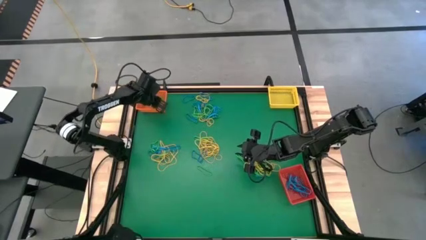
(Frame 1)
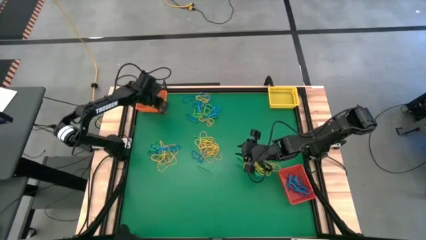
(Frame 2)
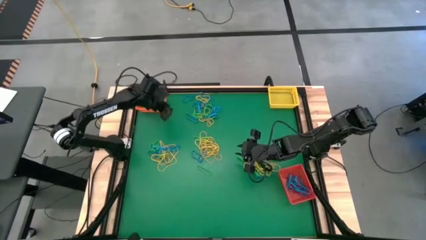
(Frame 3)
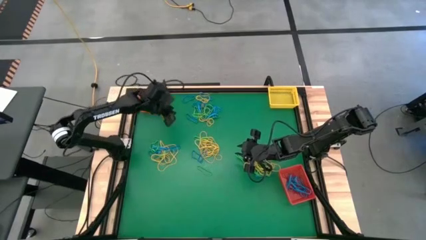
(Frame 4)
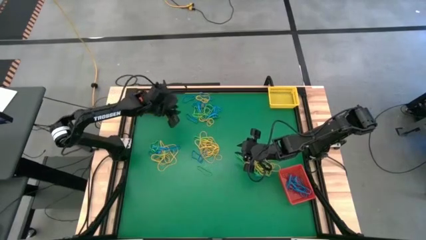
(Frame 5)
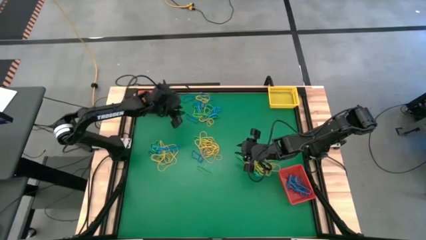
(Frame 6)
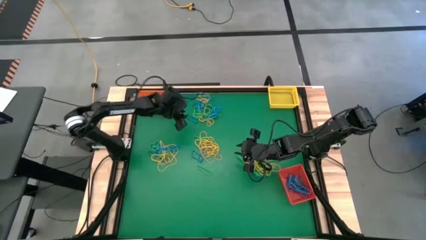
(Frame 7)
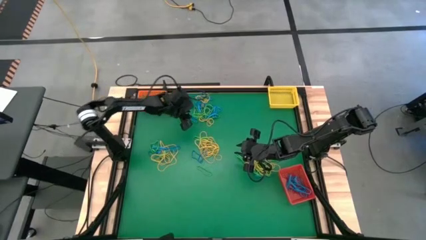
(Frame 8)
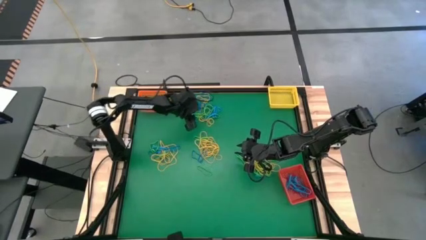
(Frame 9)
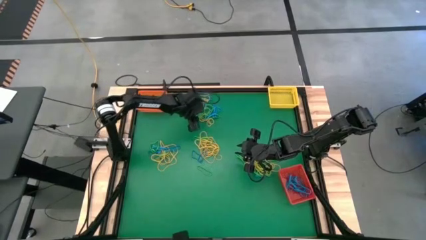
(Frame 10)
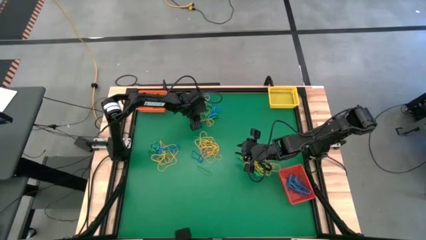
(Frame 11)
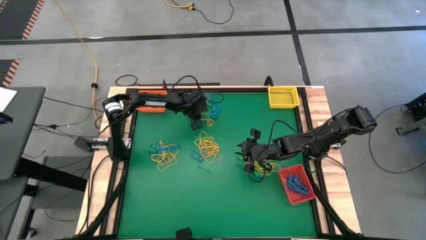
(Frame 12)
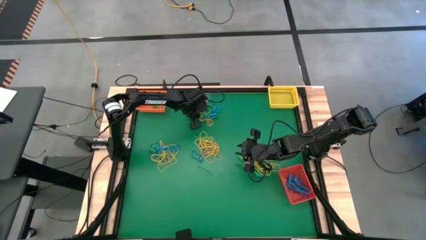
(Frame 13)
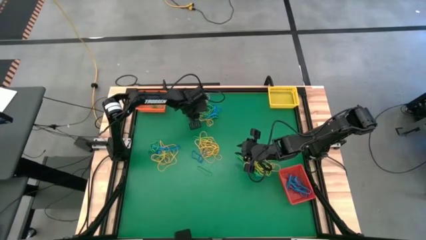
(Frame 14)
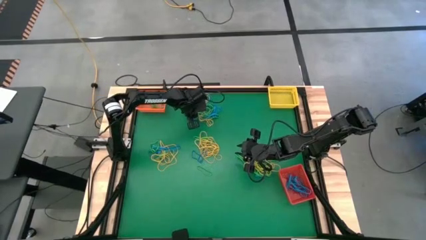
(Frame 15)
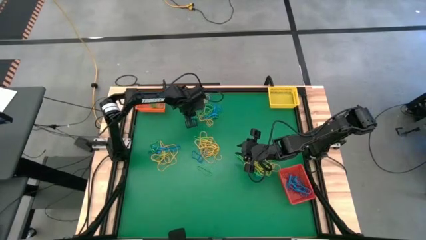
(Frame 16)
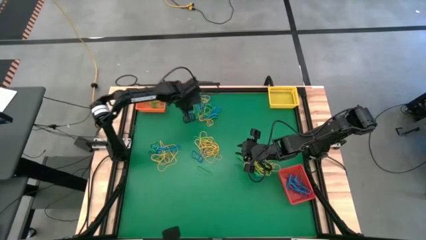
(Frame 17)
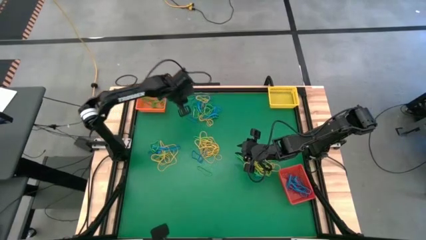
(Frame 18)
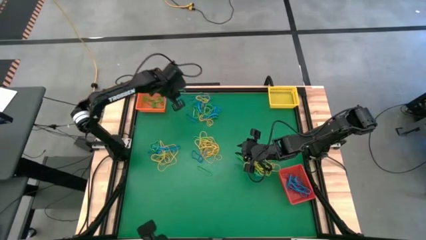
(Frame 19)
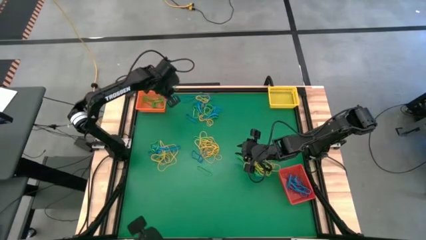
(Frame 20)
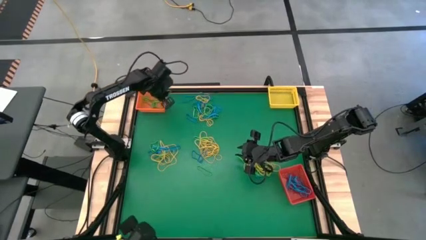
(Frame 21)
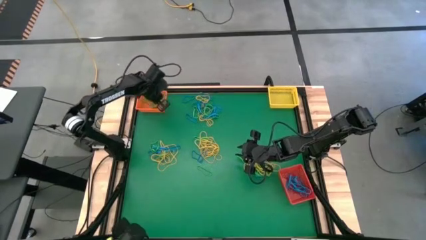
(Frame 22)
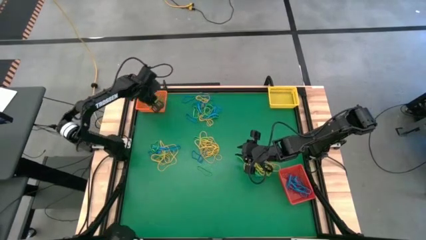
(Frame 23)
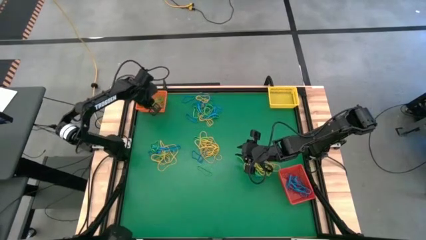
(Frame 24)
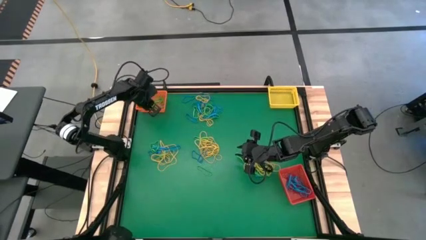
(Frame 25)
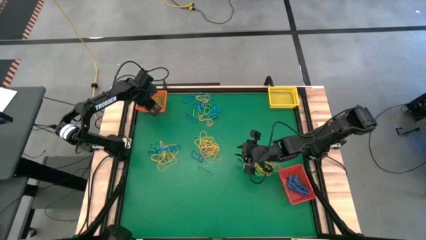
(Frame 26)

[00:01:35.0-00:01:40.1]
Task: Sort rubber bands into baskets
Put the green rubber band into the orange bin

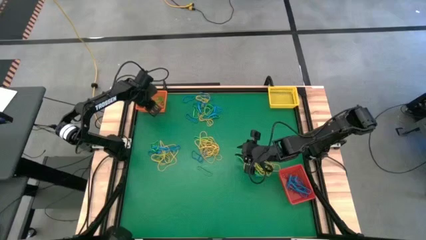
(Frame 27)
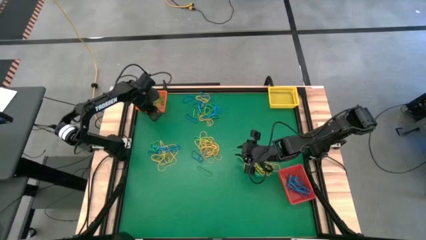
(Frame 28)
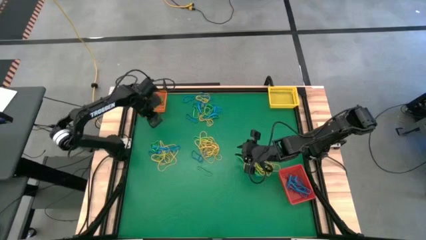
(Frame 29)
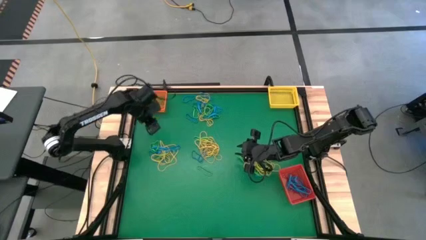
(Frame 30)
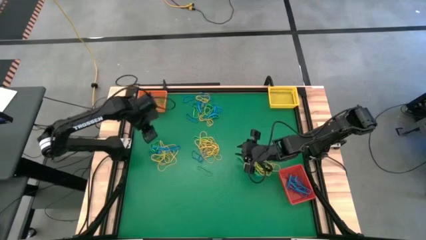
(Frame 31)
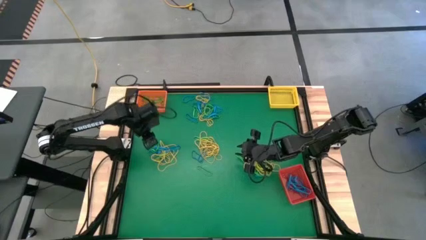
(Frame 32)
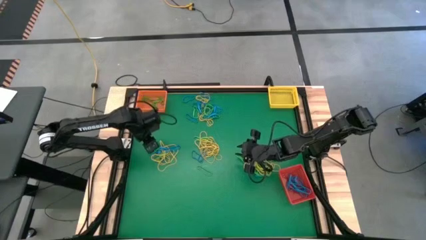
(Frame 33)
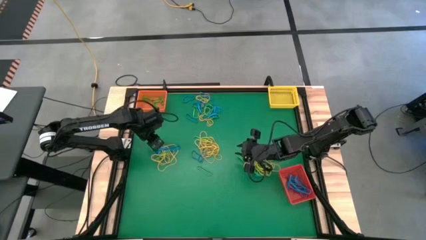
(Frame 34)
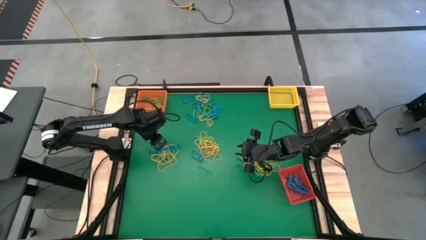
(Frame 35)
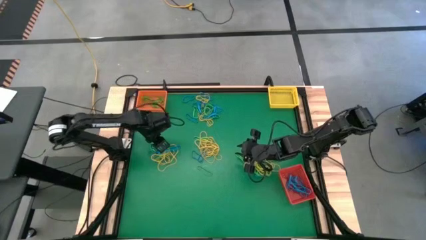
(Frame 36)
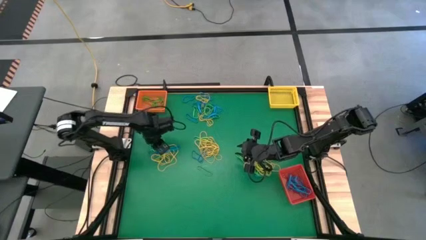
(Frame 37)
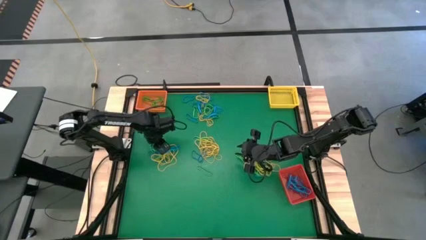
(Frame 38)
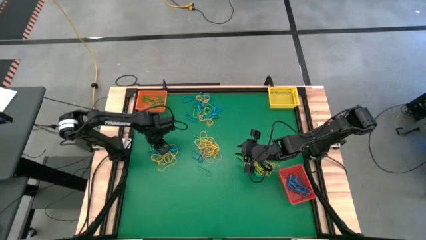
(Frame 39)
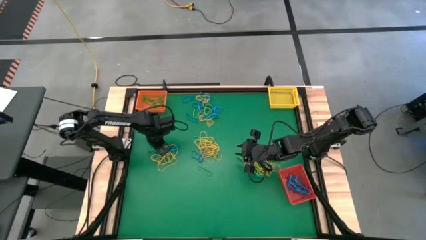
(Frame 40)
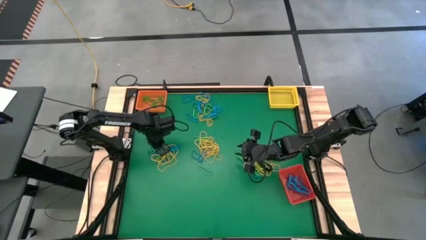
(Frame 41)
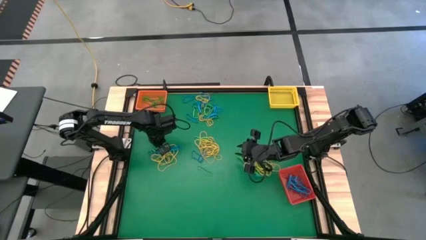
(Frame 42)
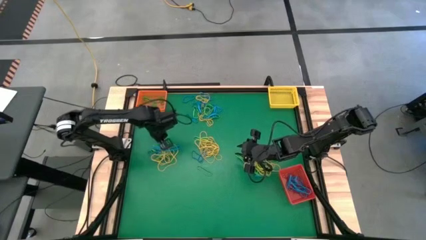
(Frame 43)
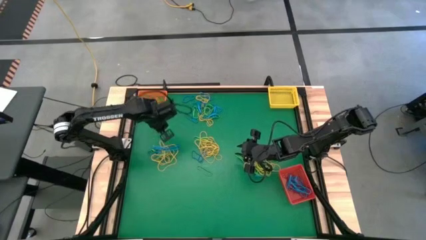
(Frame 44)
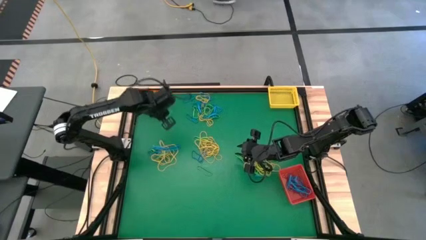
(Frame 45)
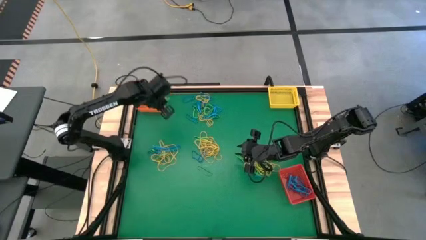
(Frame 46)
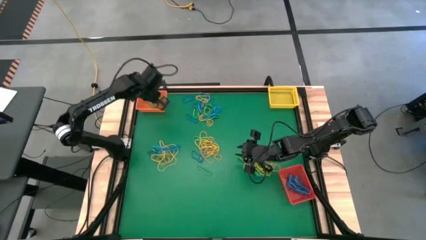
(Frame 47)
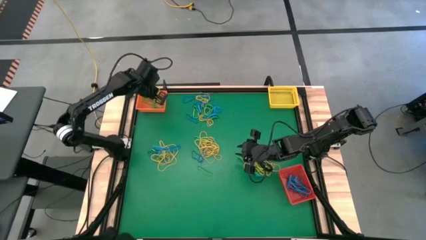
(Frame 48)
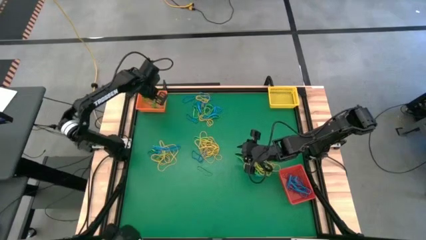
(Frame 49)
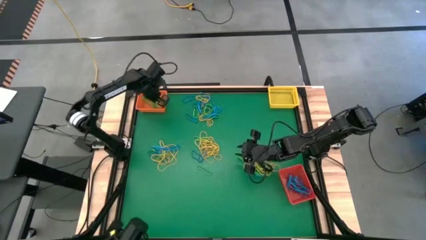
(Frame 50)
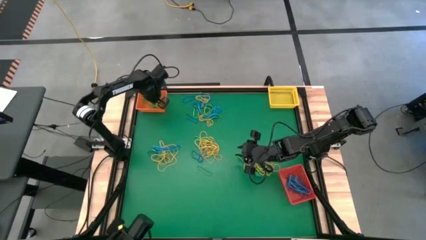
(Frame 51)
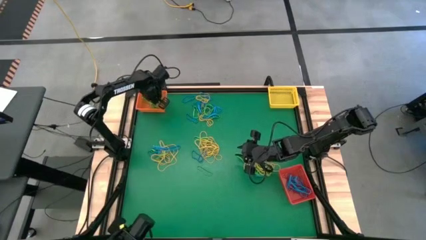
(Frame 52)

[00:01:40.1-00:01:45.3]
Put the green rubber band into the orange bin

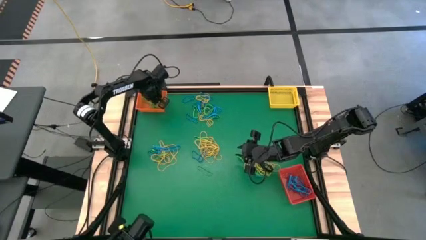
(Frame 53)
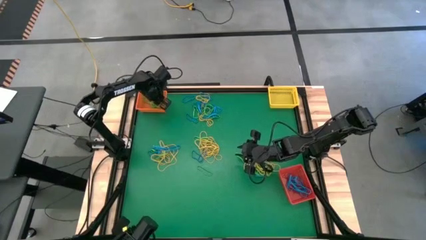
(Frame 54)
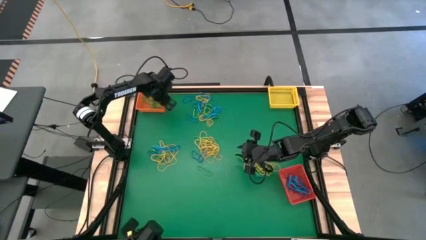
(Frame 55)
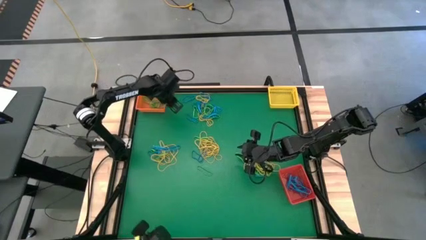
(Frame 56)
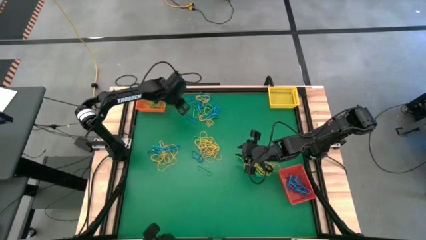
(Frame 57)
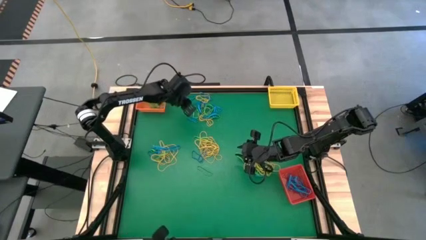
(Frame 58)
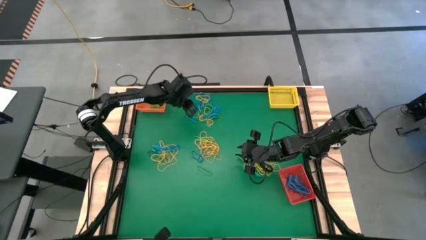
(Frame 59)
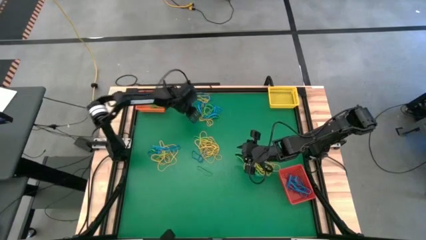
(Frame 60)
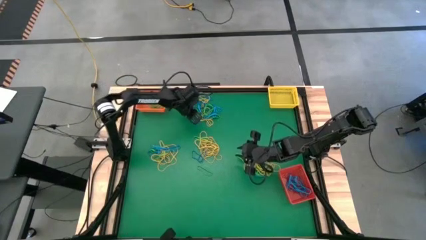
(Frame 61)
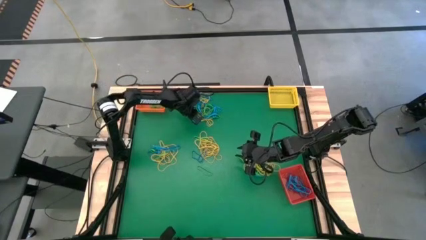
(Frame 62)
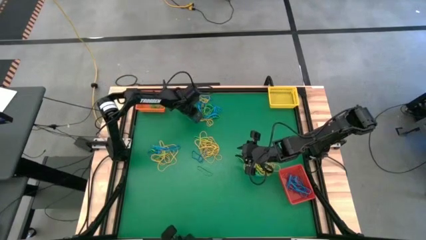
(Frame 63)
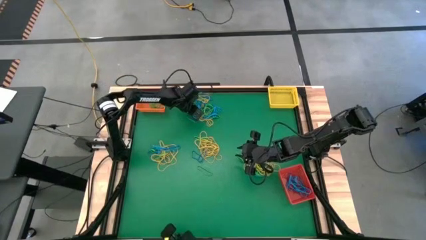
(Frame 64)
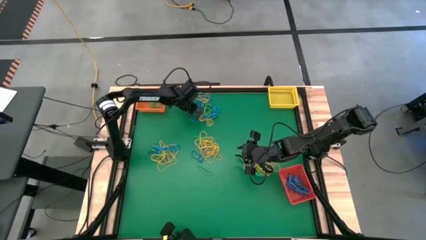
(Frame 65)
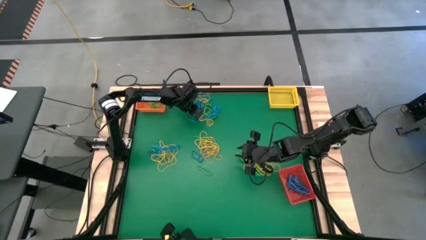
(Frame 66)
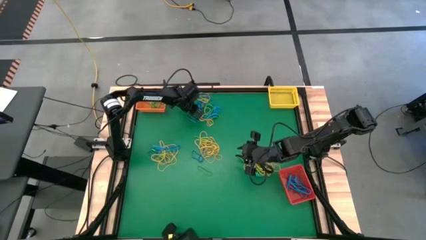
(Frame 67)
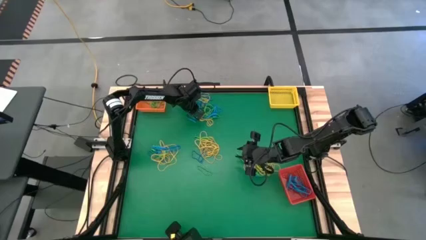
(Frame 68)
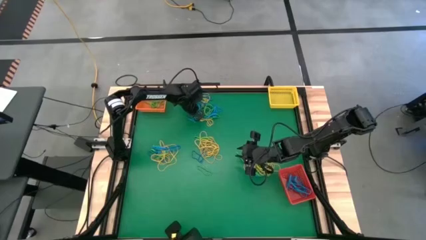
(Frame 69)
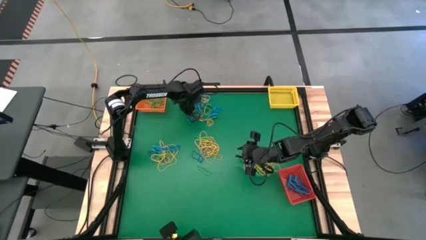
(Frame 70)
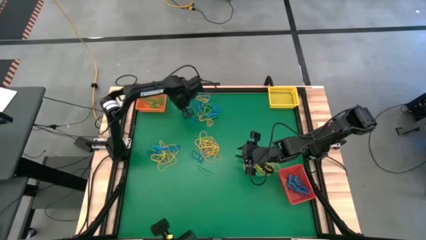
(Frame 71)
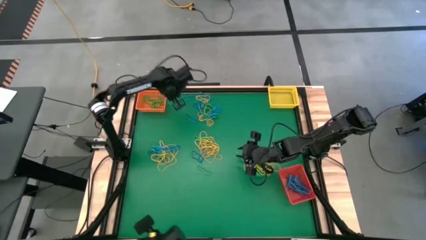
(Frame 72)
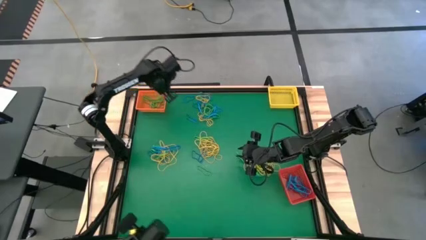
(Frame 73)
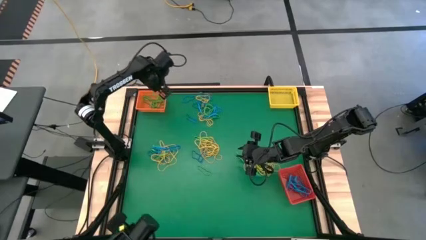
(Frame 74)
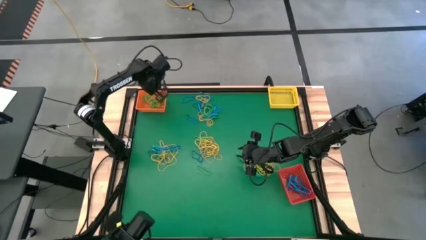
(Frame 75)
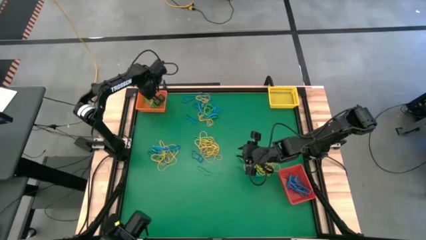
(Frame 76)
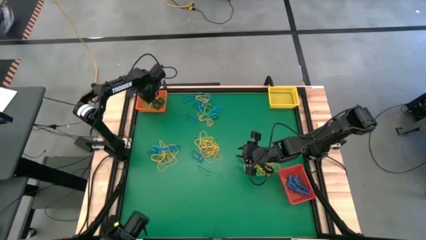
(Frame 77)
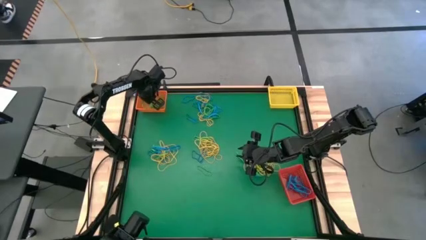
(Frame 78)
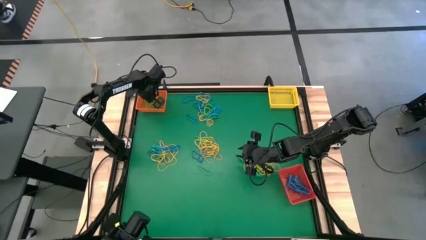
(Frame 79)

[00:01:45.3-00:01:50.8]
Put the green rubber band into the orange bin
